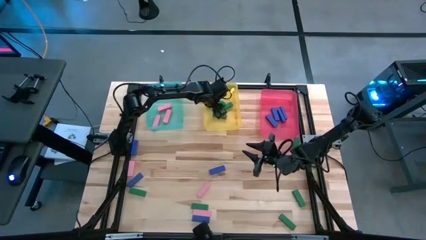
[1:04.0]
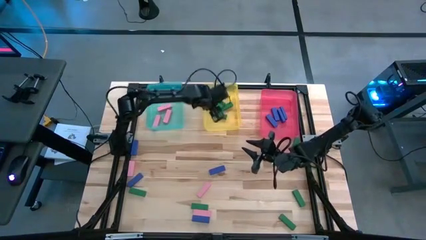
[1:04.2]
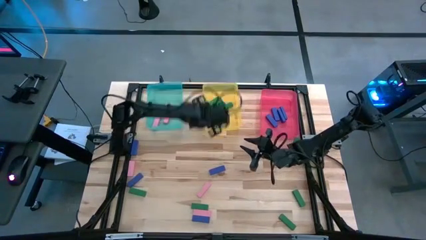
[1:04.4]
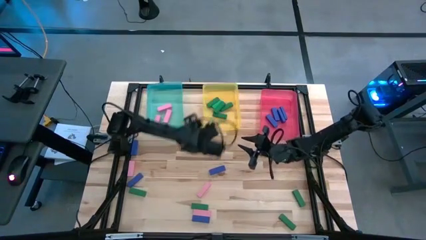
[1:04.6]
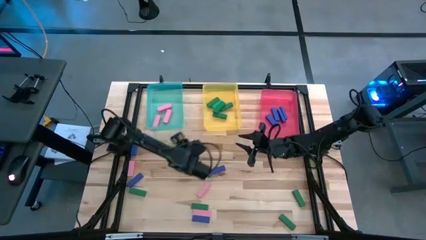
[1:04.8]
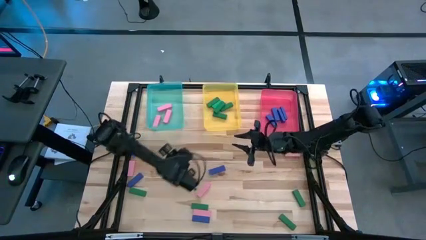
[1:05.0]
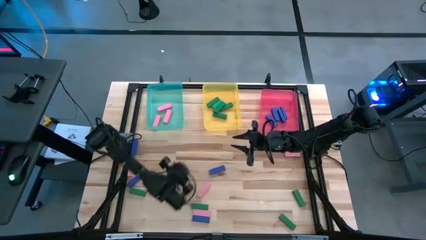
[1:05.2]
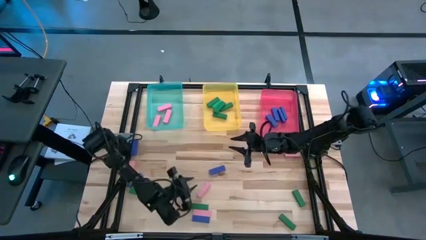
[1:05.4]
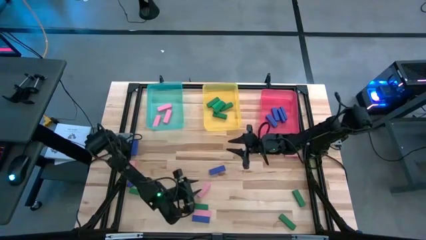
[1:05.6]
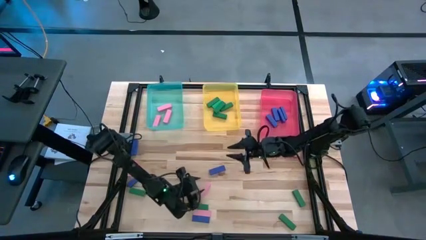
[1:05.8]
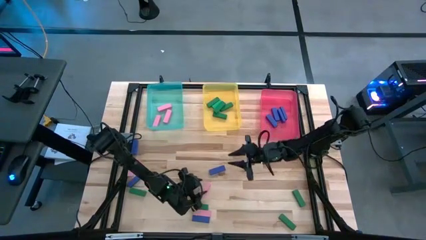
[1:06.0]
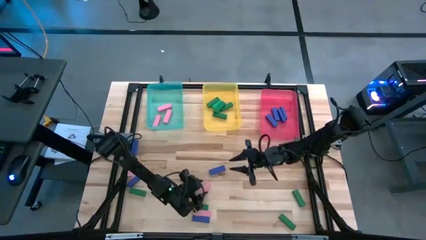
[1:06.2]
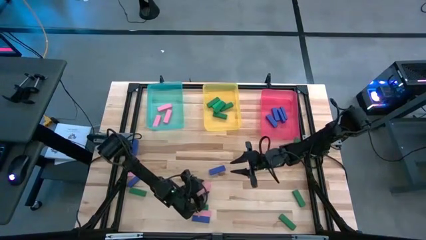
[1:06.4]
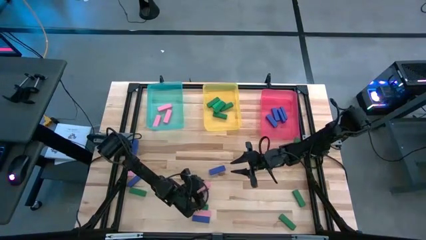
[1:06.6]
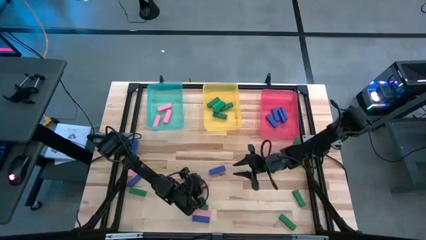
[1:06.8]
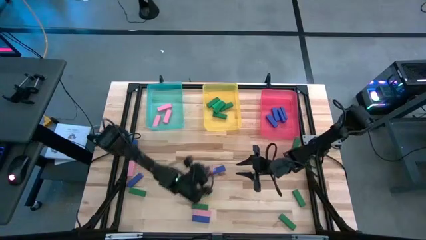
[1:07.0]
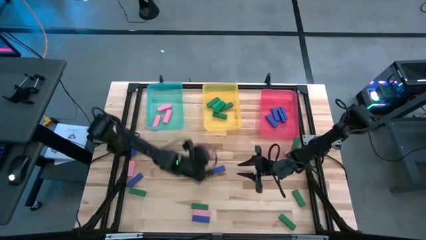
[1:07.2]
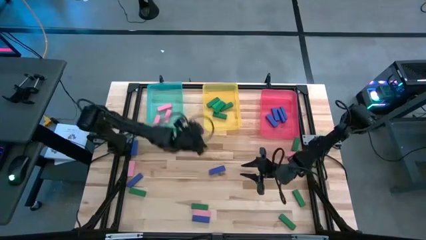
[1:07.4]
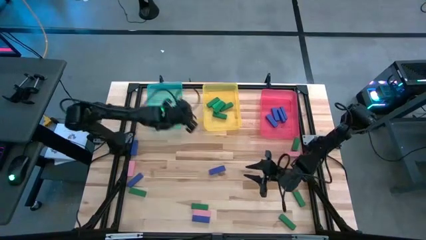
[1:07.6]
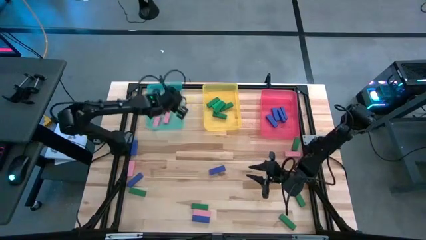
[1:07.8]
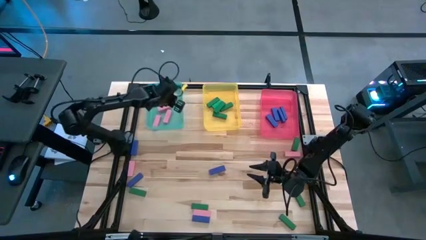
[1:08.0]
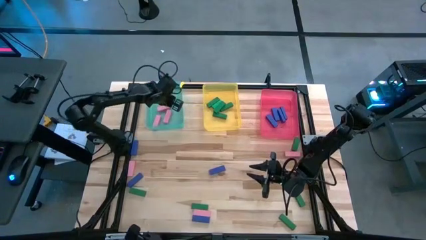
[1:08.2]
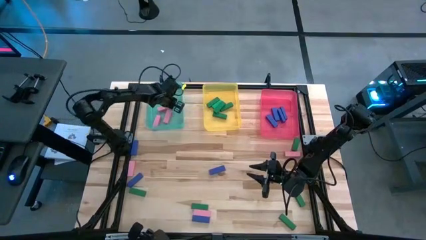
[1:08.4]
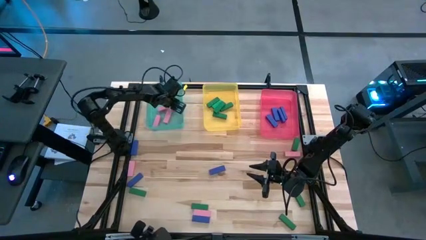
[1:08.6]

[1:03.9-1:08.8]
Task: Sort blocks
Put the pink wooden block into the blue bin

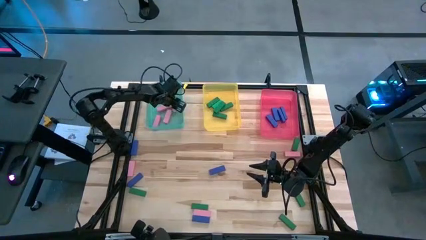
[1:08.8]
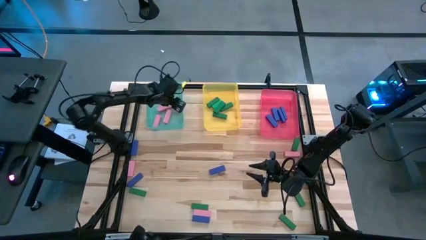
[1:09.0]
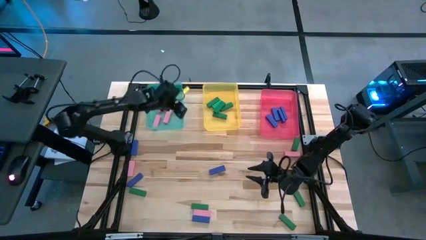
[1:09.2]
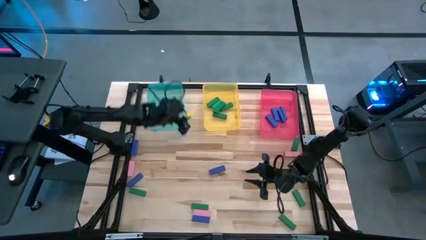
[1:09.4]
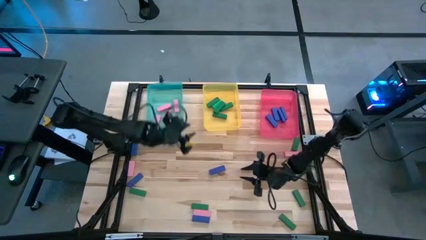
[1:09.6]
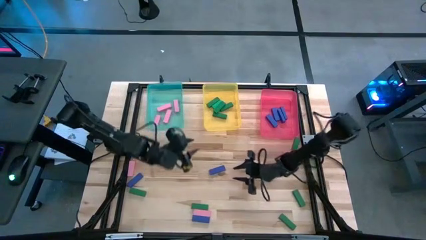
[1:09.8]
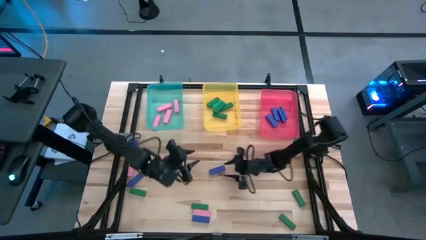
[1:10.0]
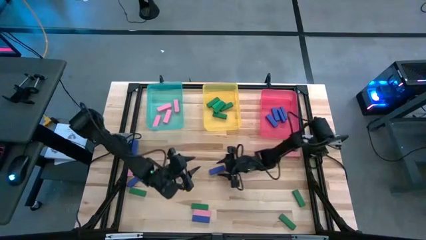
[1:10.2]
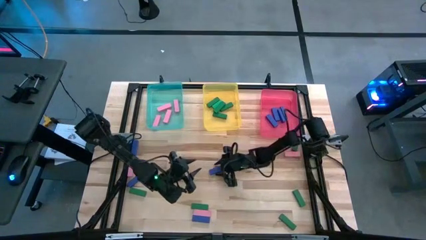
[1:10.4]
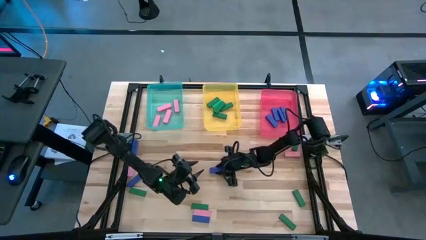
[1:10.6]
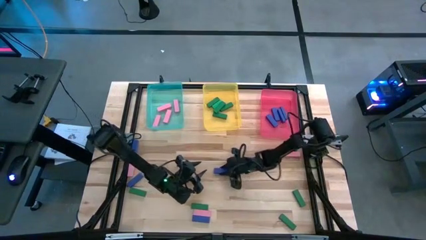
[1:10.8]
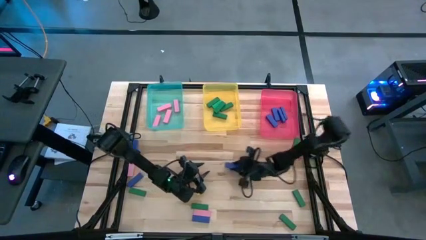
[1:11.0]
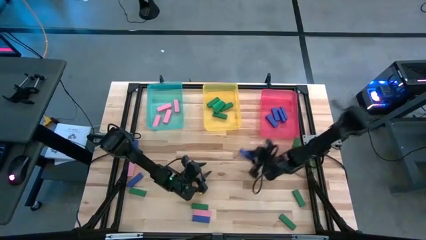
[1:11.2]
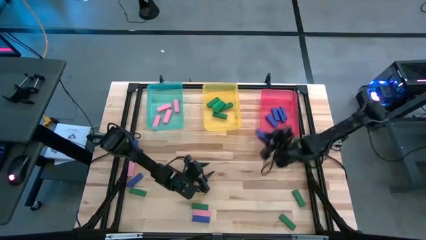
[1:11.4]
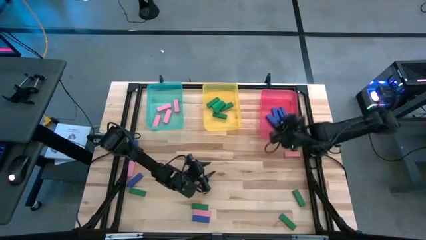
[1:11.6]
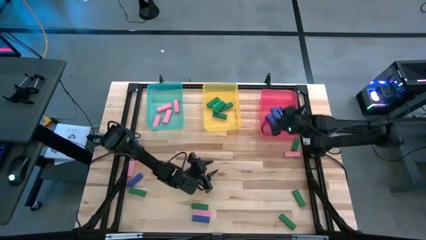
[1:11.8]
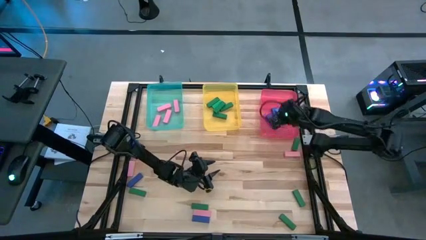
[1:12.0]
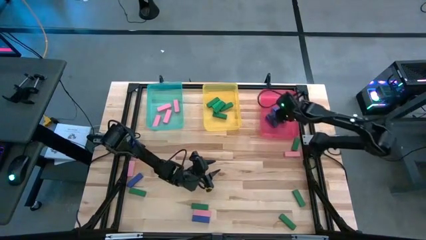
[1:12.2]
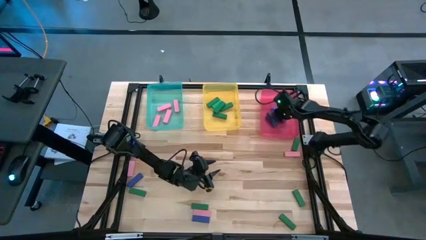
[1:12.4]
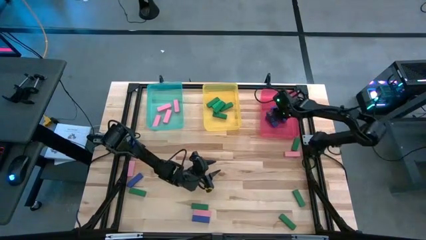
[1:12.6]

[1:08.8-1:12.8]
Put the blue wooden block into the red bin

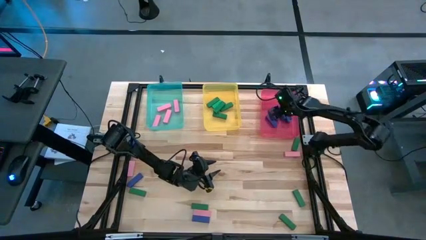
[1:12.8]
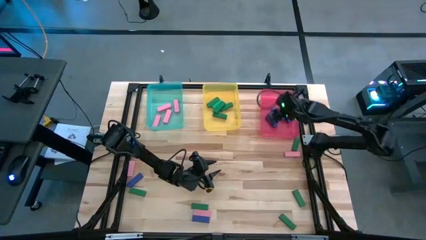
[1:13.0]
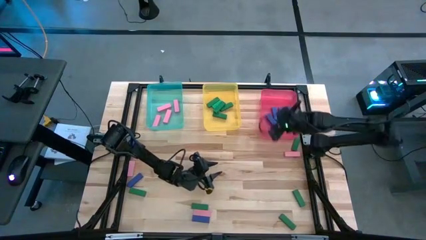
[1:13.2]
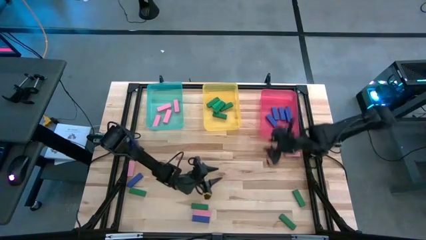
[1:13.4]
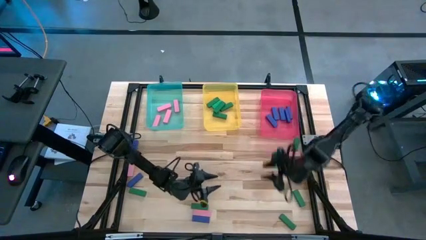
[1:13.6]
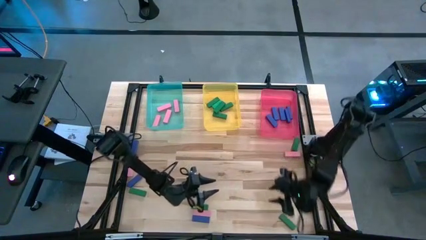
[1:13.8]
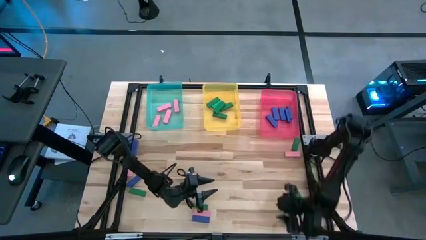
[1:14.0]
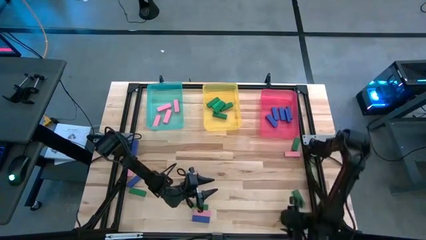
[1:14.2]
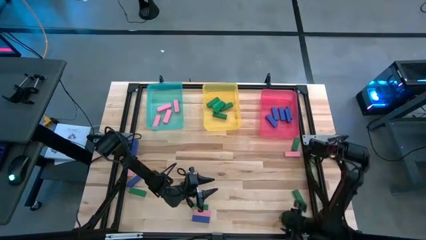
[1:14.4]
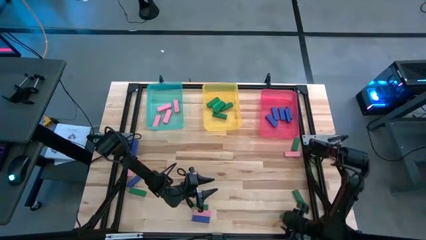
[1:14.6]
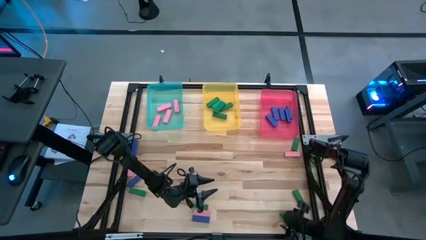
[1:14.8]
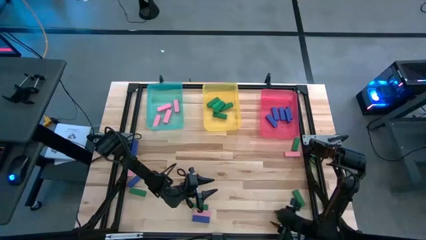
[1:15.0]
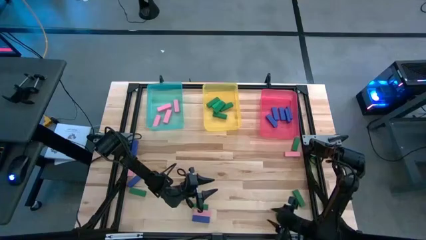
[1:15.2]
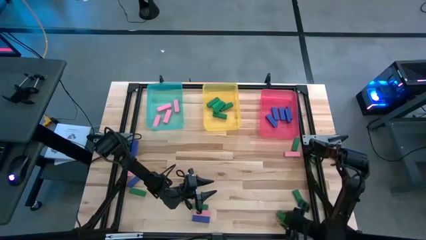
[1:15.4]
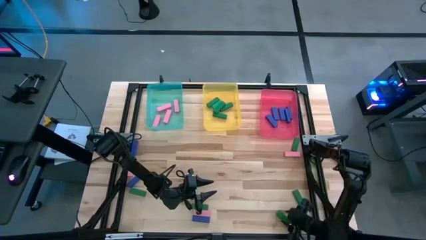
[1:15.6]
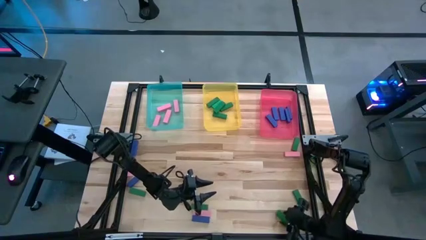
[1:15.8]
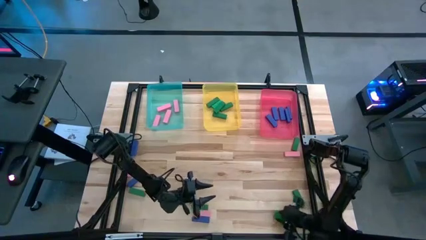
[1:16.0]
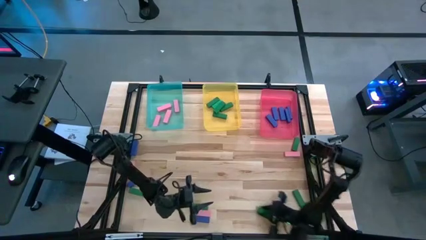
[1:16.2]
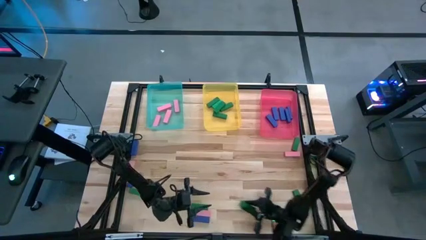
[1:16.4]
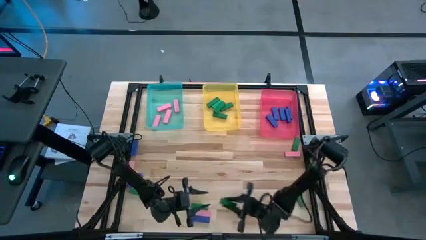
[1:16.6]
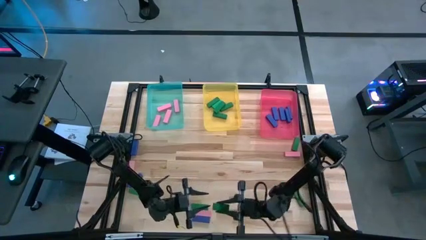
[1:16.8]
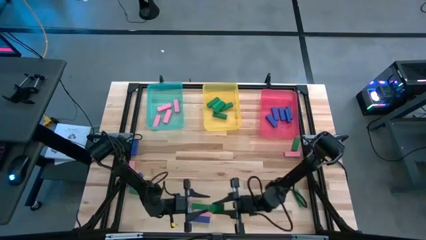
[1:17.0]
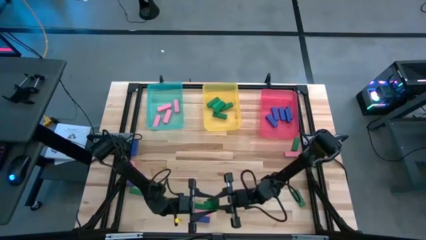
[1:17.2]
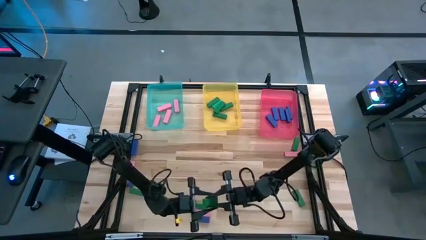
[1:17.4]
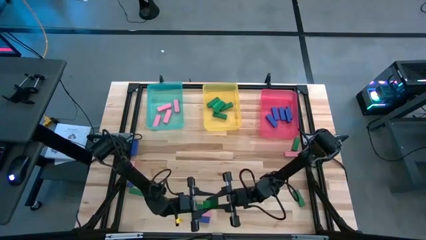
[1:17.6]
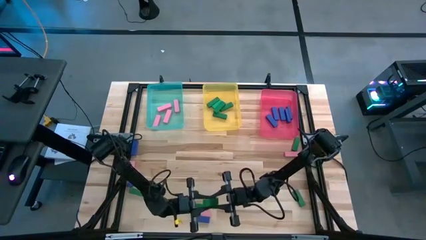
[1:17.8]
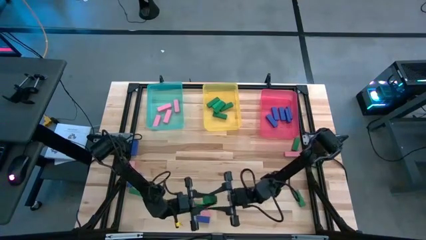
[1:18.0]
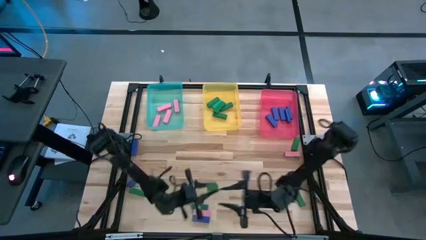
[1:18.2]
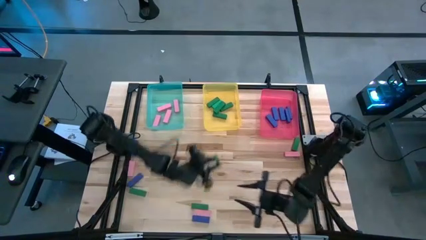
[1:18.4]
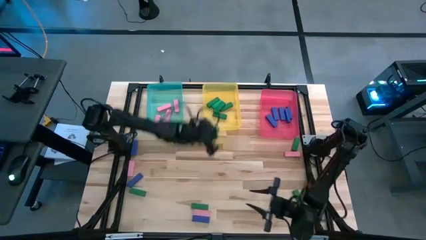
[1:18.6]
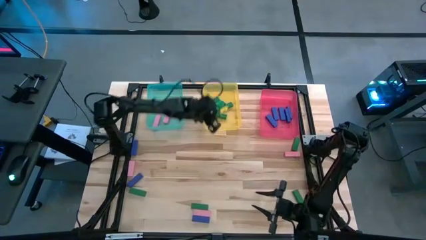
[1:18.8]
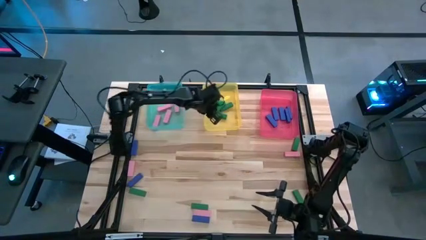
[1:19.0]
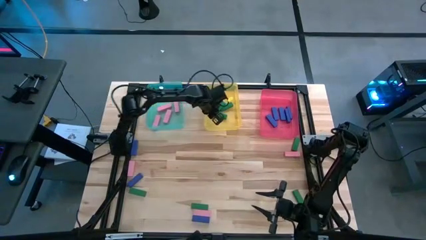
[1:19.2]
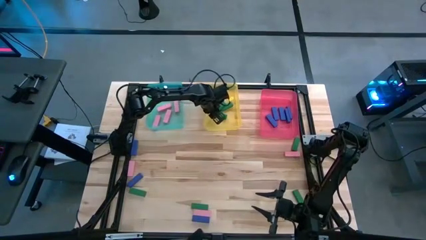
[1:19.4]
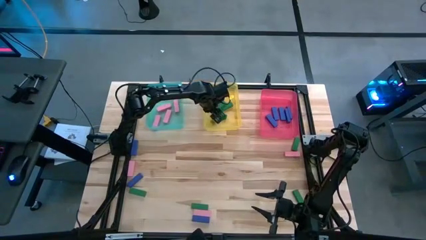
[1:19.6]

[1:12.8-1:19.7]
Put the green wooden block into the yellow bin

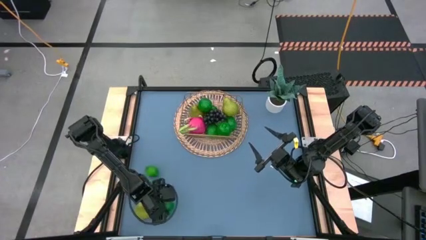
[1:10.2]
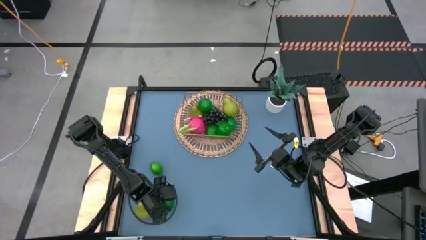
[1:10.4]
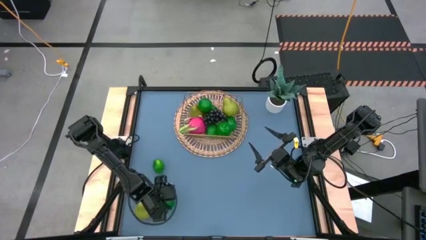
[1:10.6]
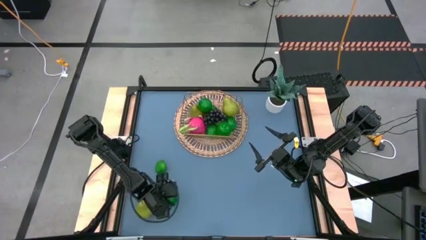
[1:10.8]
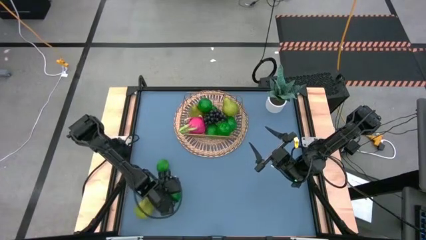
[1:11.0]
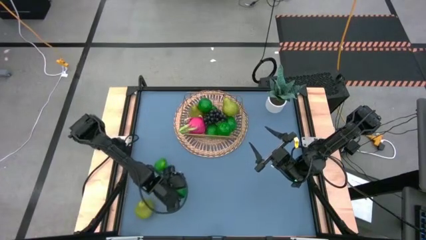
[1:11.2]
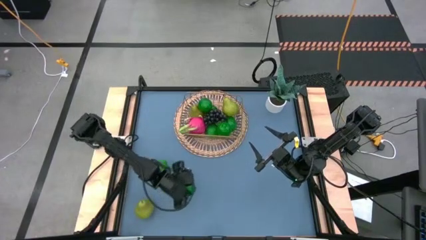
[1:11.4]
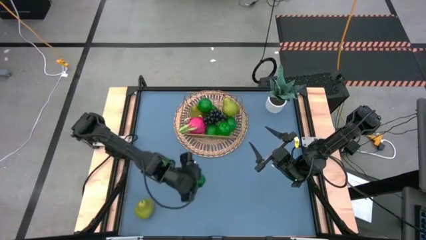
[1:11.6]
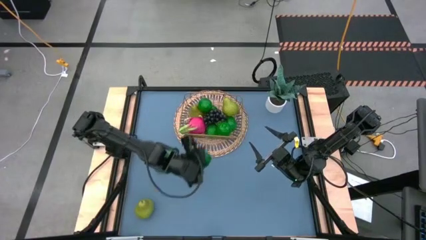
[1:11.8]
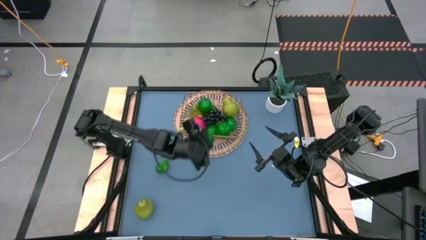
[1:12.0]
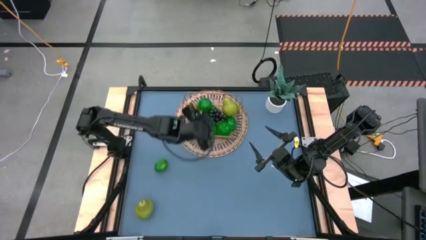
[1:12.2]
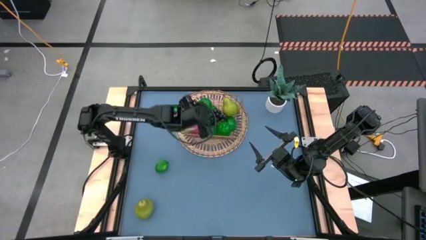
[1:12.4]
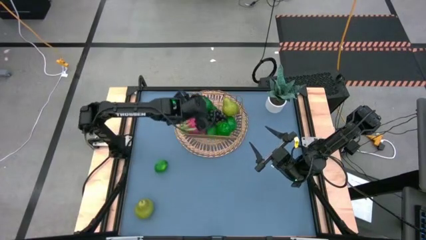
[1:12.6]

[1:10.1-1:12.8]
Task: Build produce basket
Put the green lime into the gold wire basket
